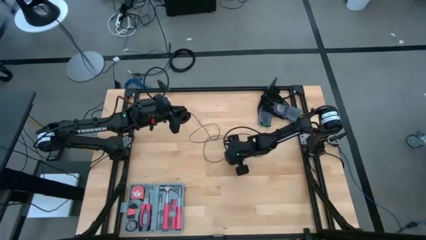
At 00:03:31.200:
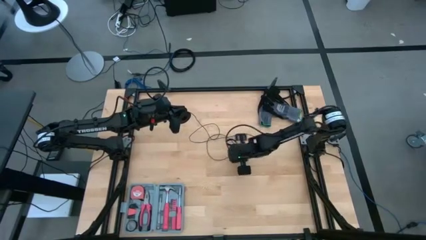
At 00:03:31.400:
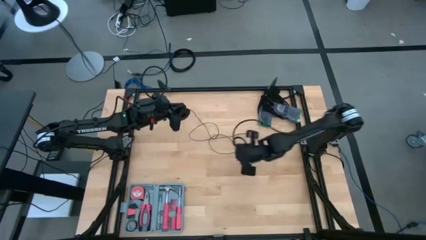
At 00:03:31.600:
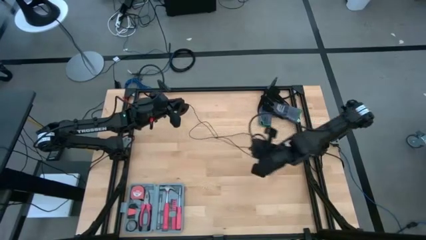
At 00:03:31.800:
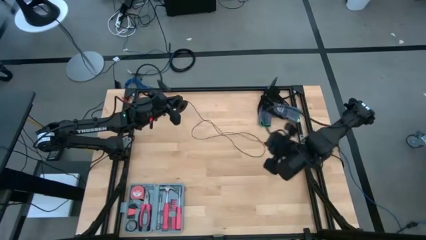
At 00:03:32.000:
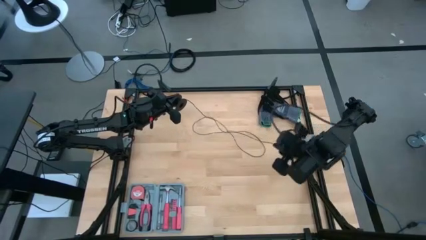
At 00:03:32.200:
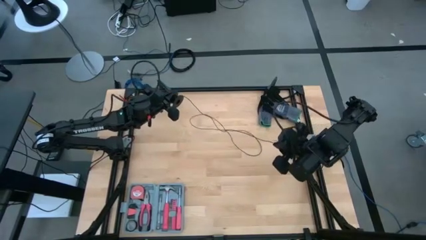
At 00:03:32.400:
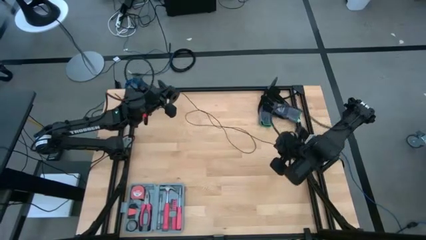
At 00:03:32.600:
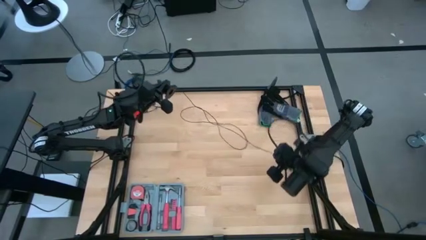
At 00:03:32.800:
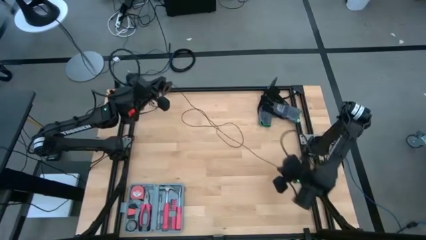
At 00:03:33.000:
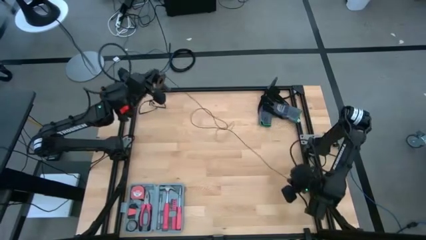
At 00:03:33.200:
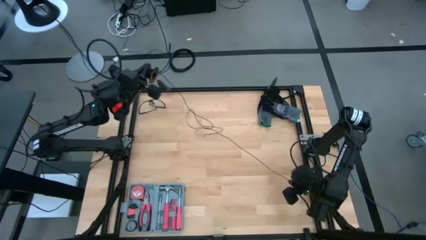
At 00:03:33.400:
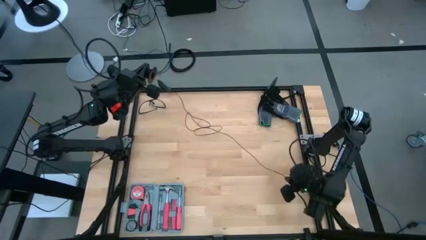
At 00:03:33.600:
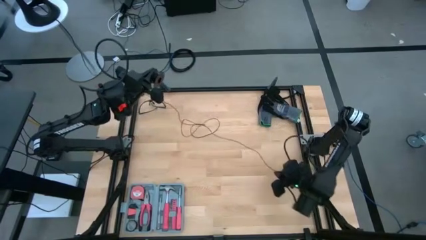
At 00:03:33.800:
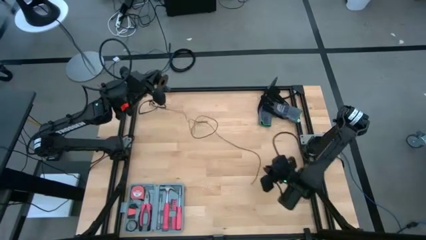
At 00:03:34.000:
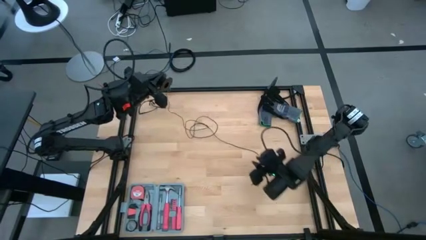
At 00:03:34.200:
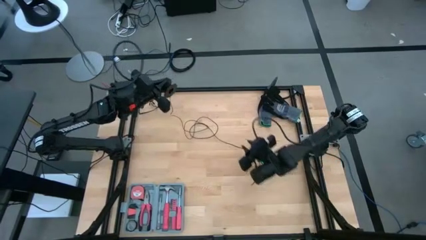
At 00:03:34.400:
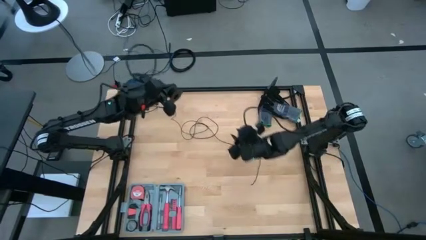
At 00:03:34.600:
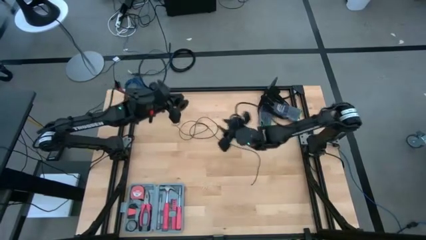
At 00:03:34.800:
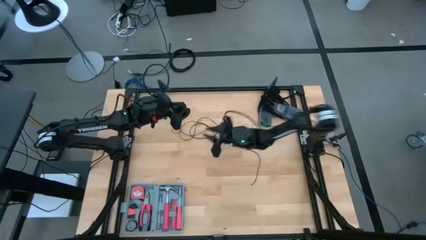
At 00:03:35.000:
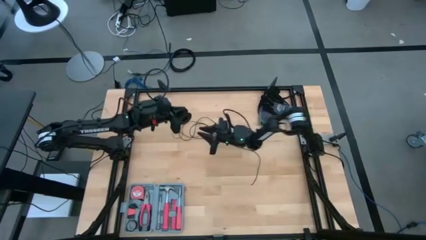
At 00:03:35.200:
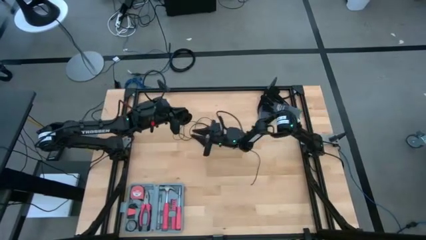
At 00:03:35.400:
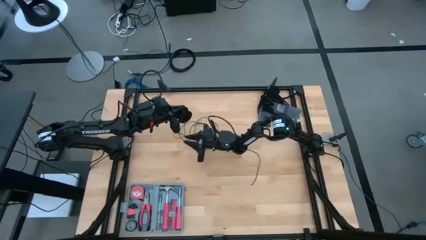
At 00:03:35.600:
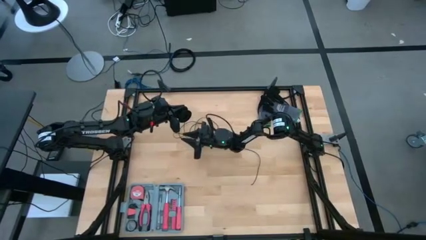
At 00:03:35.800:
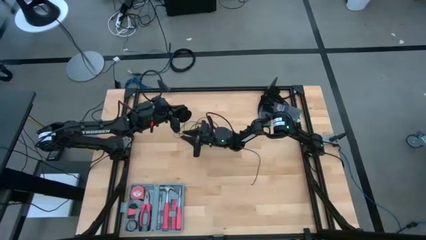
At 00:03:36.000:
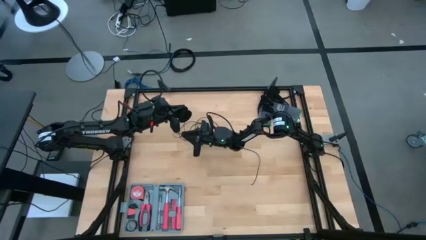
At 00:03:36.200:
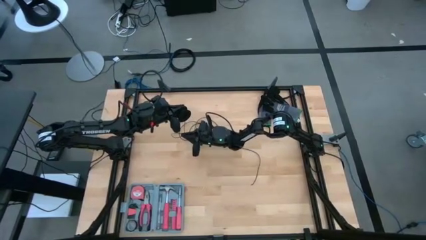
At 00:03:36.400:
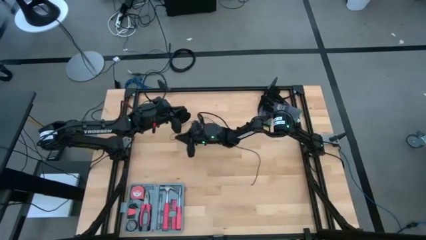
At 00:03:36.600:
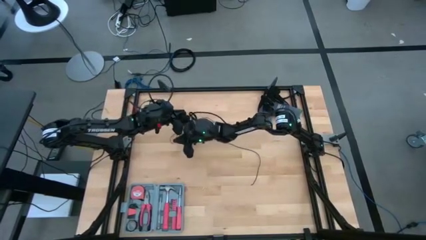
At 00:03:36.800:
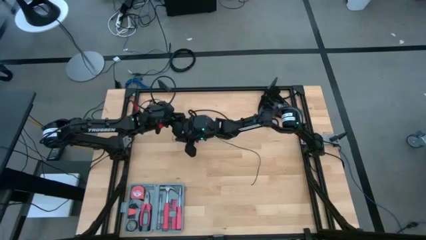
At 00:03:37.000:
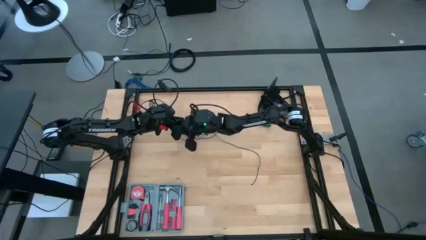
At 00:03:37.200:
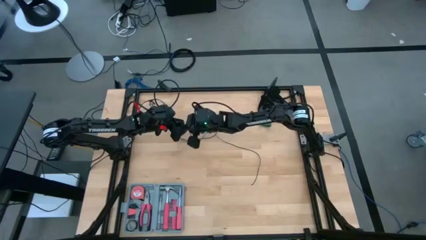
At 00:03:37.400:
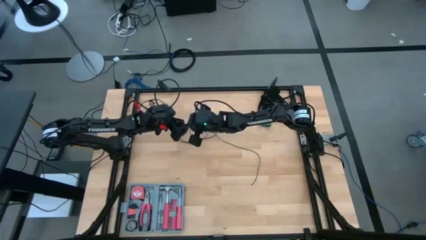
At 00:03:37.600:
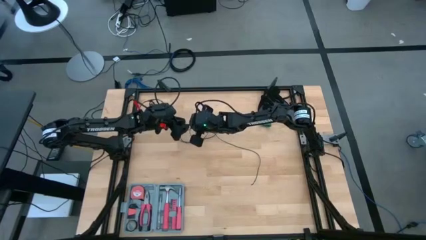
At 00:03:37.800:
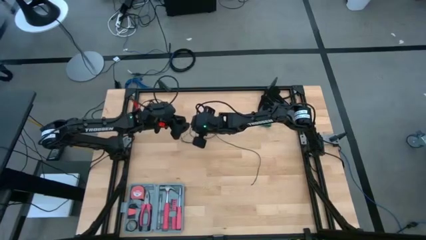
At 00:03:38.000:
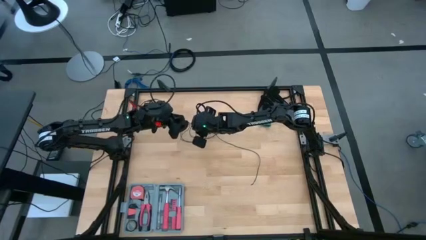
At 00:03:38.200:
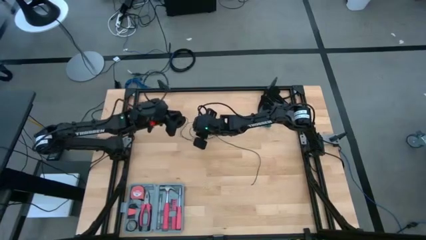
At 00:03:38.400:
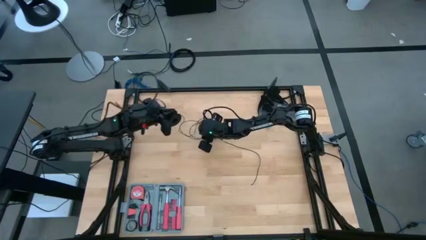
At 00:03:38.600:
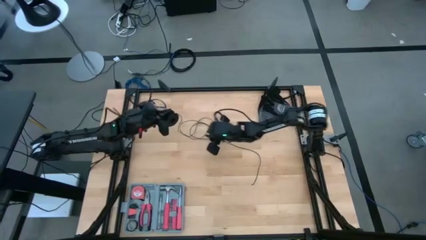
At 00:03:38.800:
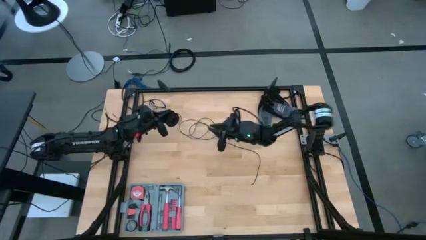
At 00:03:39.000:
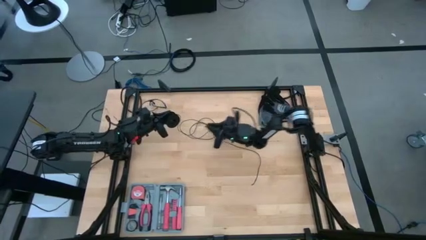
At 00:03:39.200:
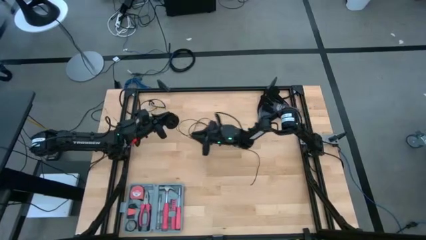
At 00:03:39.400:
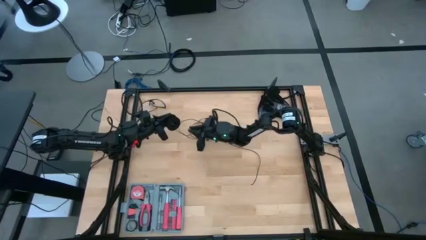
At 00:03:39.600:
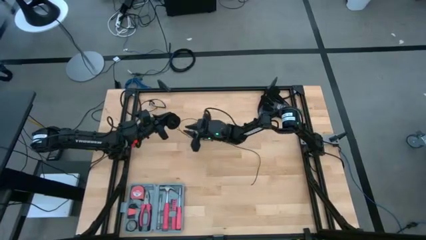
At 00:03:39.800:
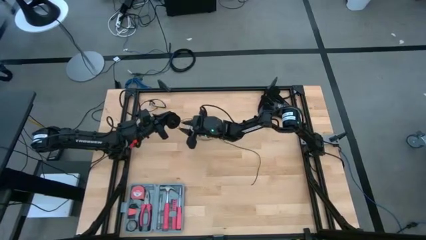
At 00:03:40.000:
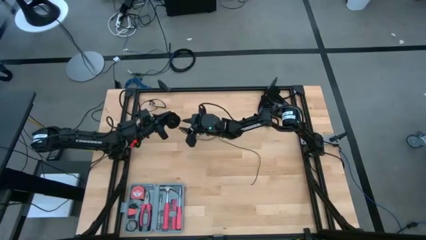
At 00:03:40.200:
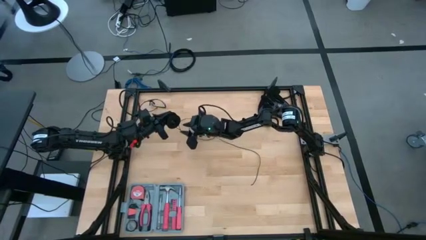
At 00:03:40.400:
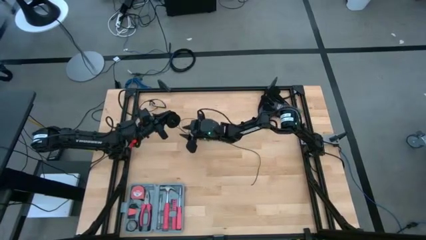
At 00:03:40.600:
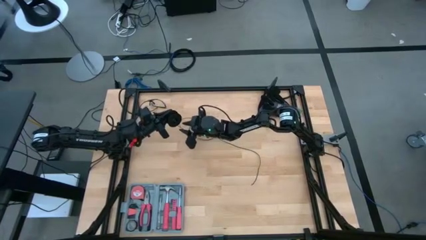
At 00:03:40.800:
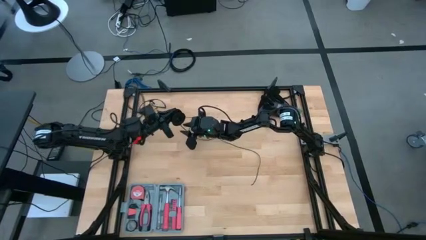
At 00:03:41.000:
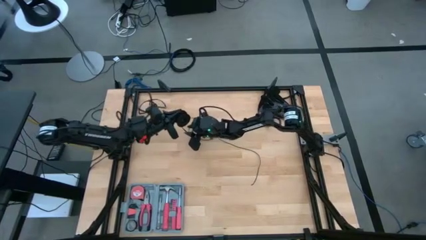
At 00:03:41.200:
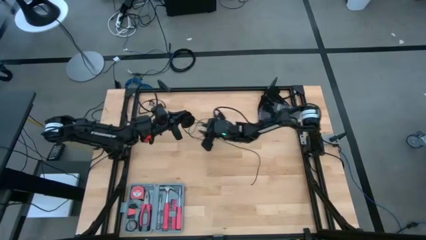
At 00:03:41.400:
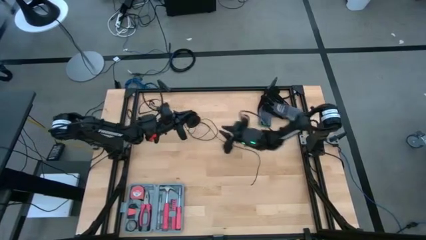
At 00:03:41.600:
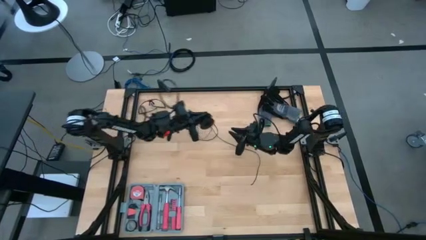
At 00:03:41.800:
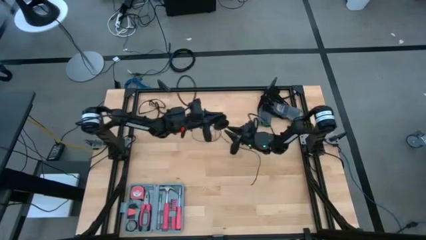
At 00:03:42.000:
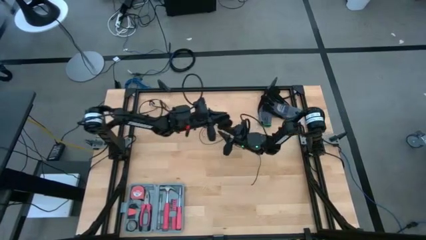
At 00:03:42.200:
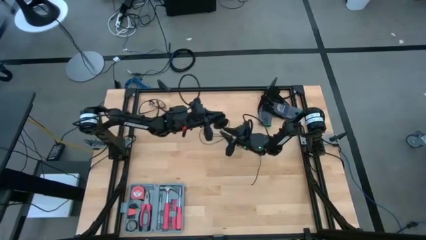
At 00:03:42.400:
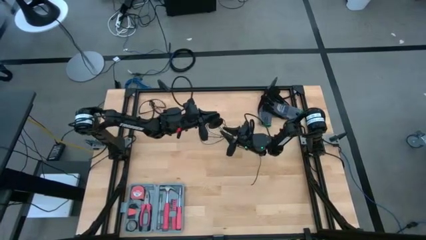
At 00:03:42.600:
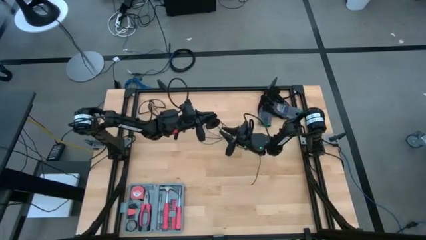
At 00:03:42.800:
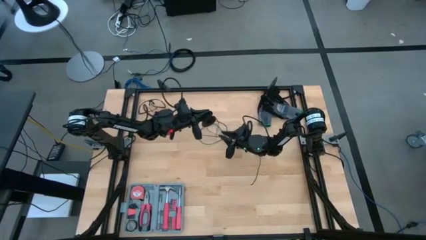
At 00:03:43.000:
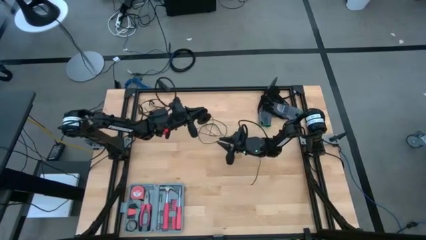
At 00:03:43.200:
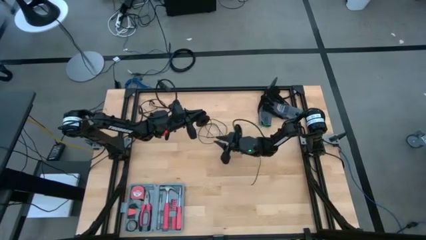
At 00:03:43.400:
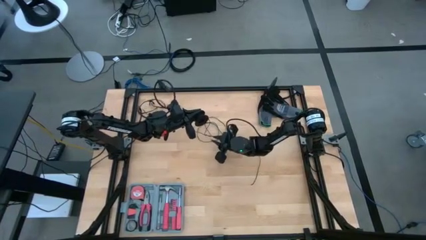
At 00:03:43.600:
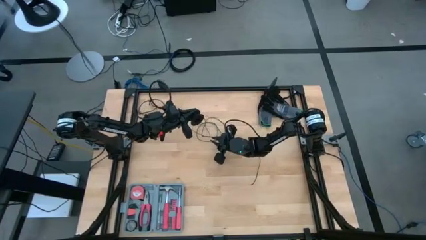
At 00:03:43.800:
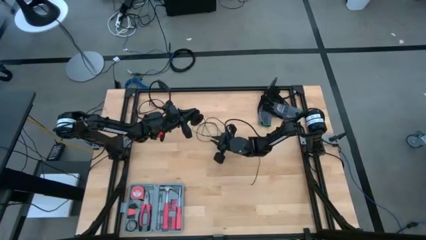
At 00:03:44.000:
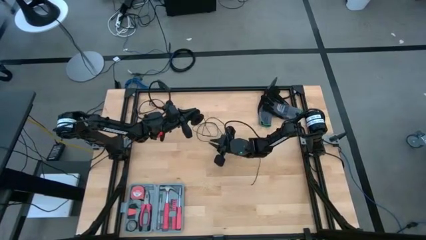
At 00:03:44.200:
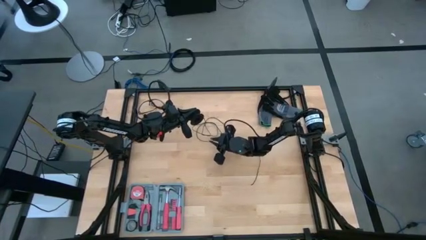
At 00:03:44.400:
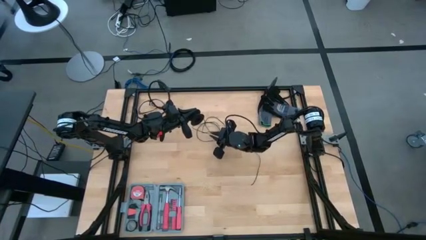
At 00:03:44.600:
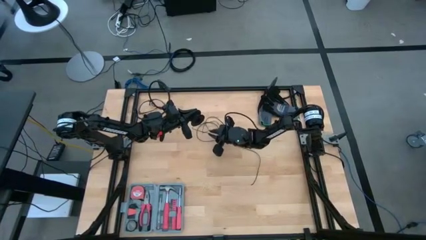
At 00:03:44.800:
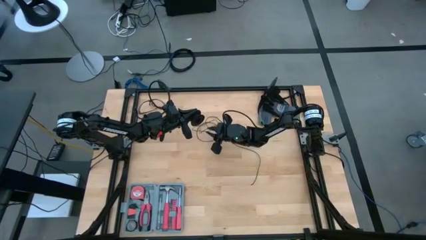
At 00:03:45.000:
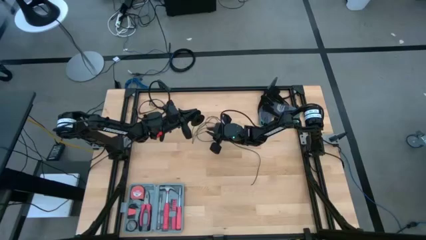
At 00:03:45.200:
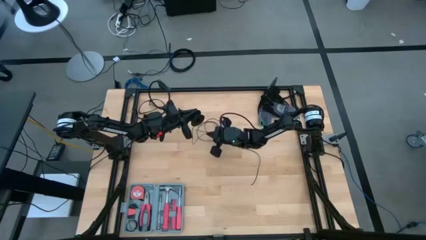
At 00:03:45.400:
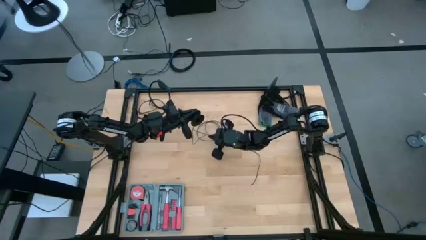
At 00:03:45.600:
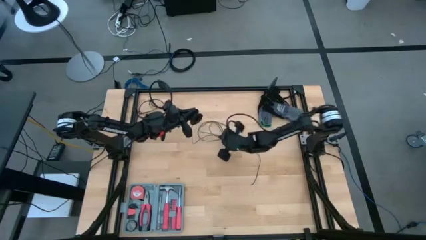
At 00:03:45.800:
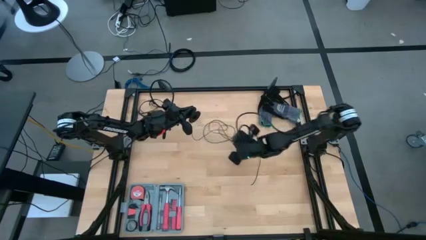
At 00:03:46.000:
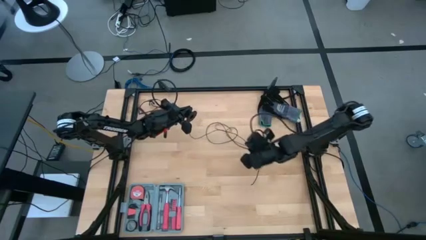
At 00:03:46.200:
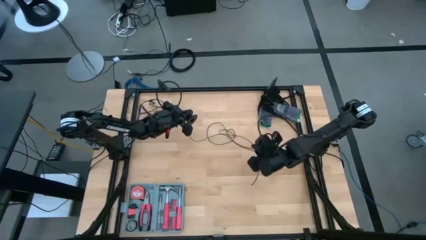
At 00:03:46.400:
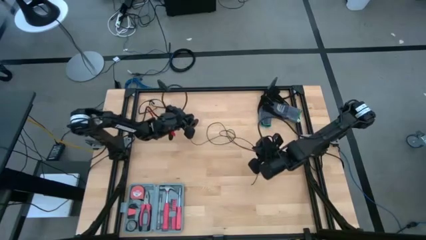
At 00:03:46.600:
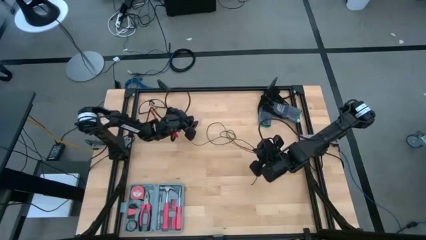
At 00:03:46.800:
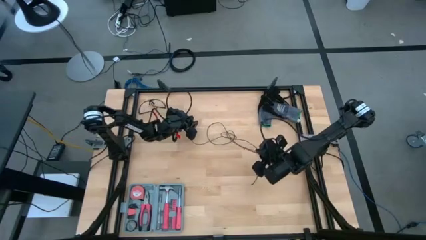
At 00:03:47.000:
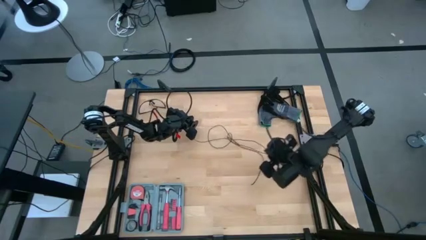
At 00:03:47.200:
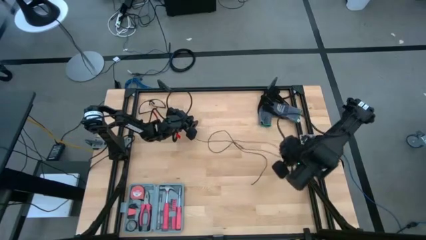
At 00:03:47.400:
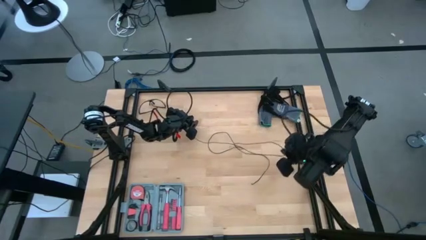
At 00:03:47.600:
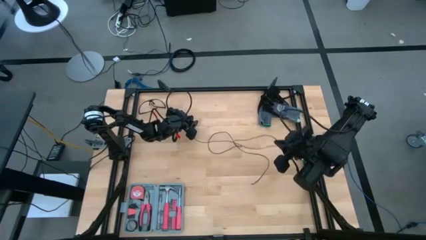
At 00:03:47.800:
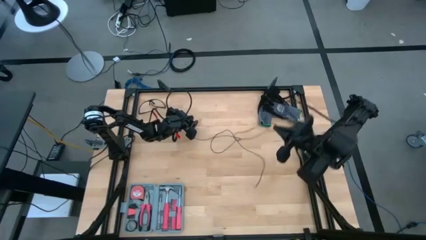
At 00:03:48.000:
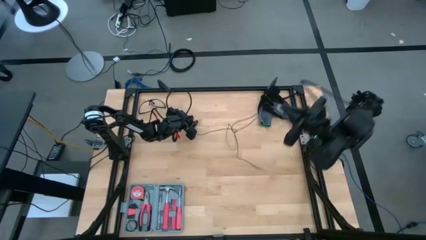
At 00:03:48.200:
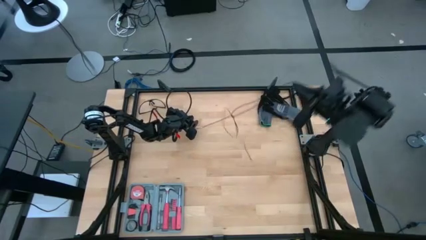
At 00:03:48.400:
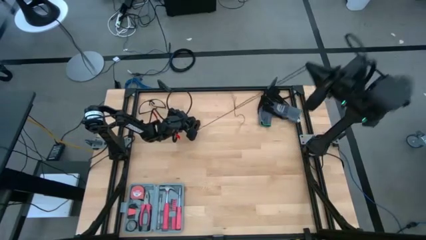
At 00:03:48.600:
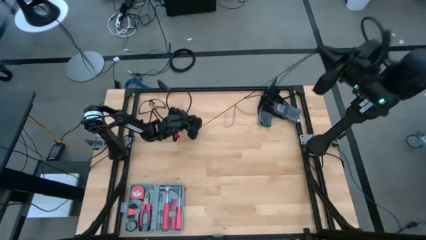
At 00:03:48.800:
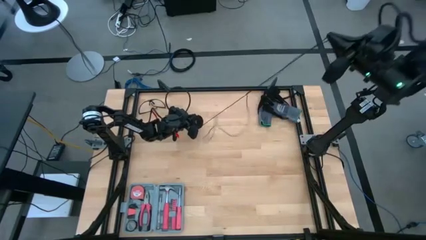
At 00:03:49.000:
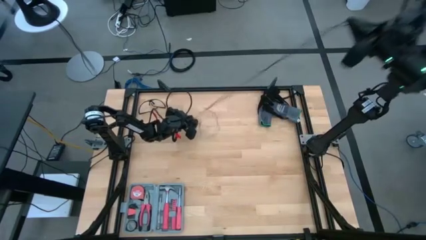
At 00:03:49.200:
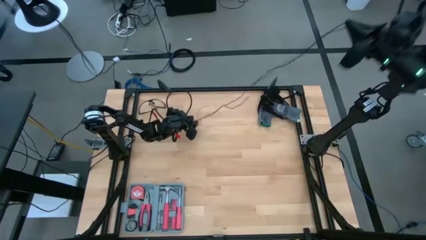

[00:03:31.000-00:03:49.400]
Task: Coil cords
Coil the black wire onto the black spool
